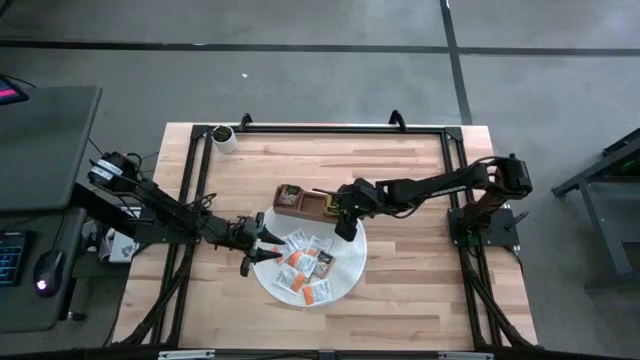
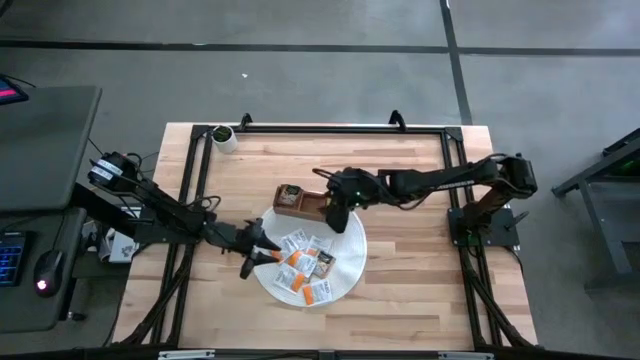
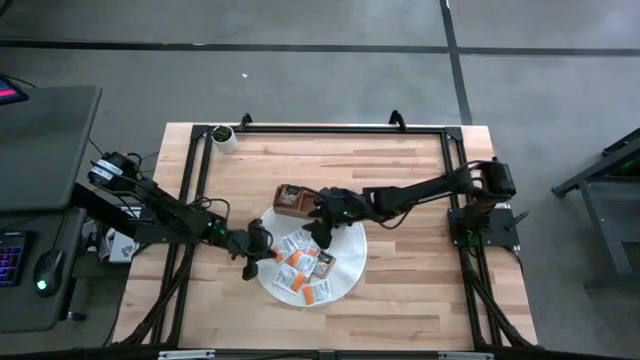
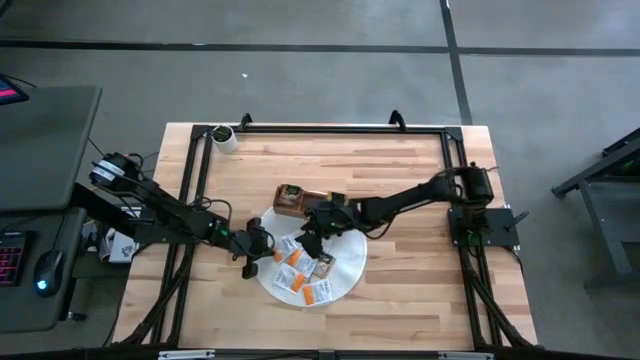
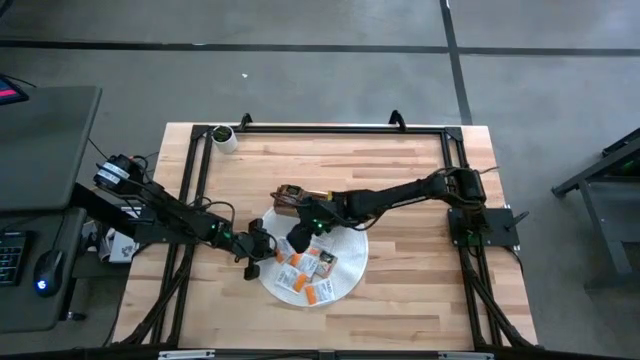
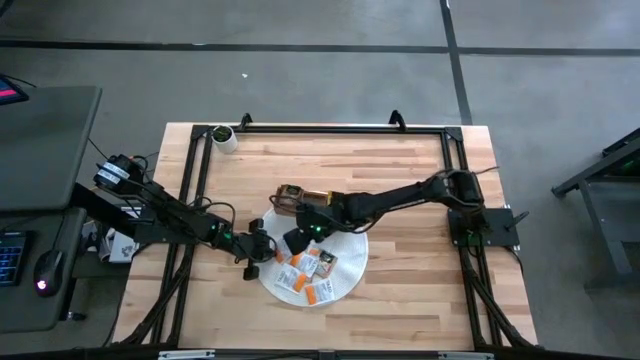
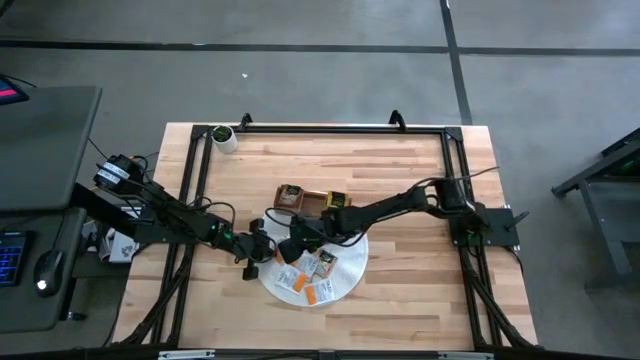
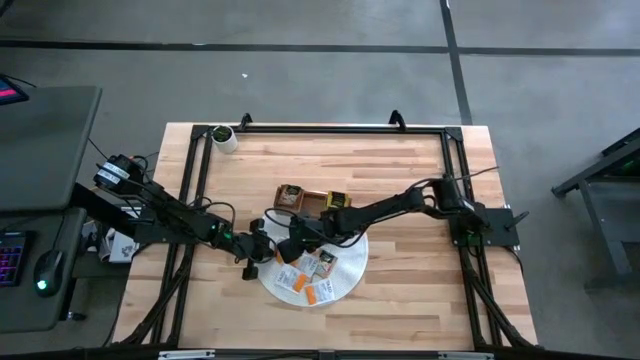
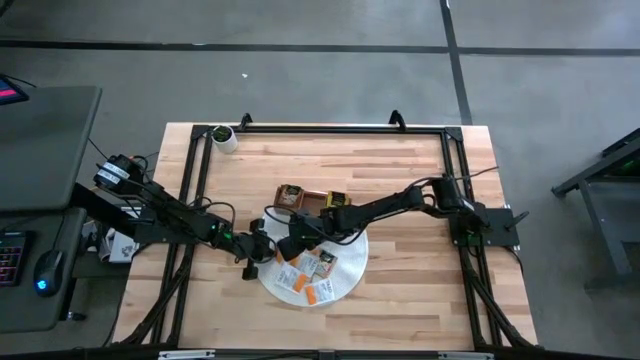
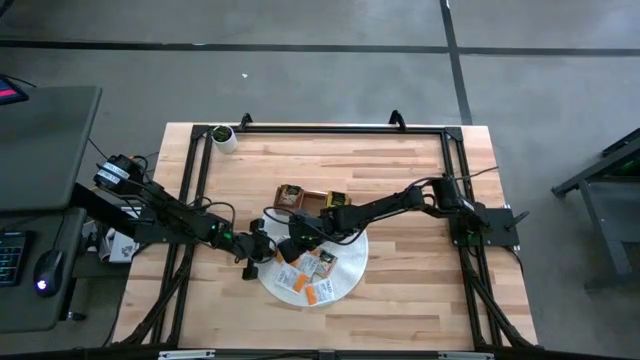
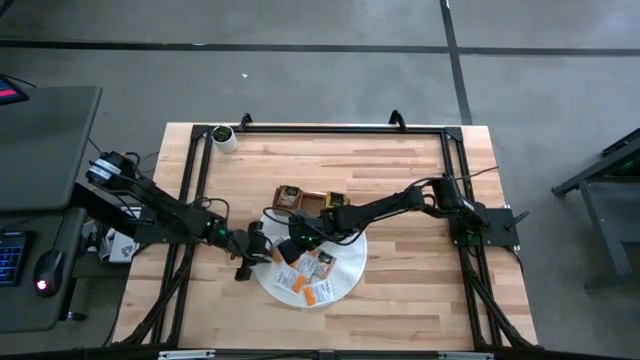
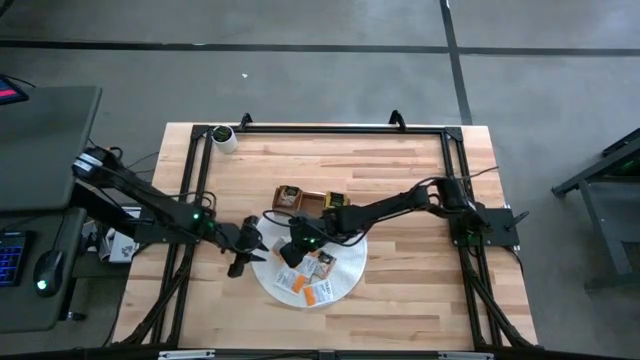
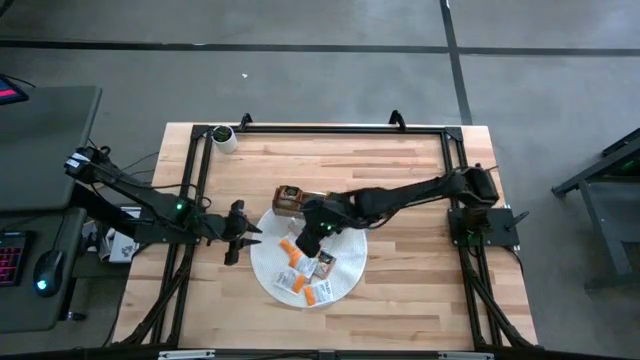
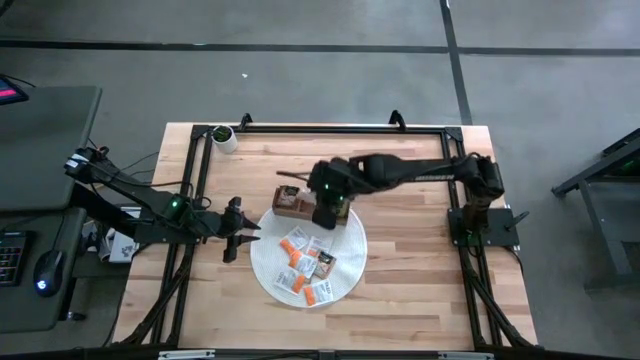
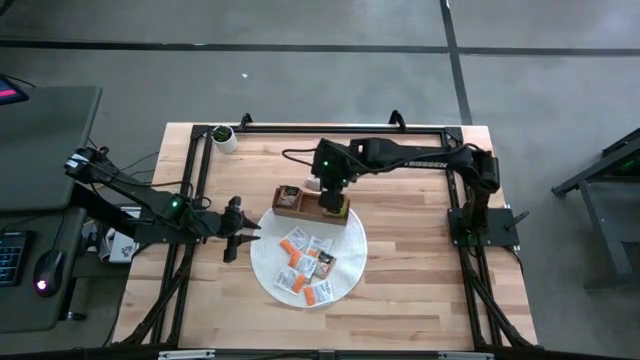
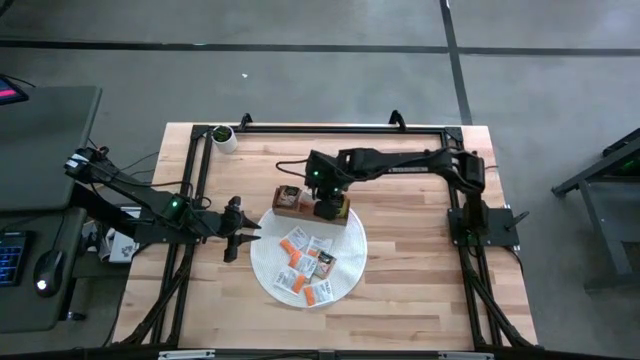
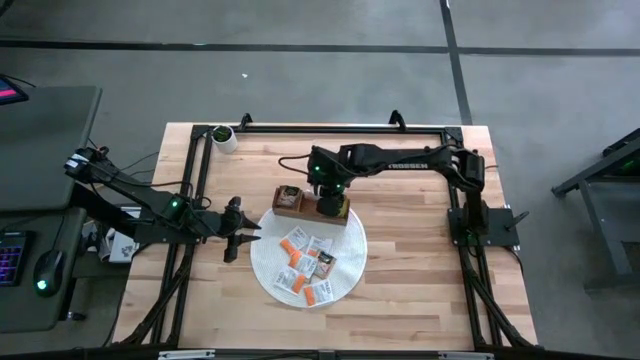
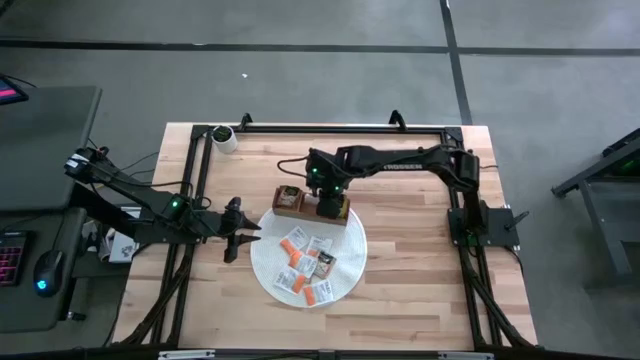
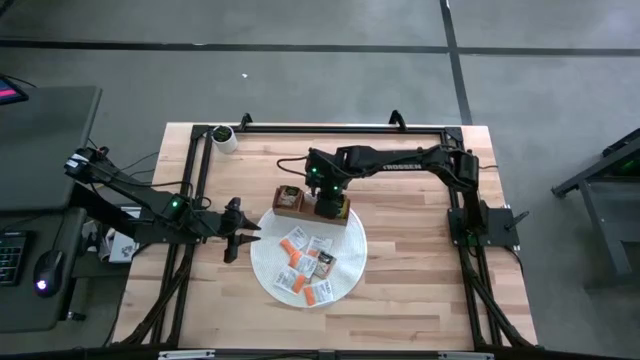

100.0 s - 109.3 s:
Task: Pick & Place Tea
Put the orange tea bag into the middle section of the wooden organizer

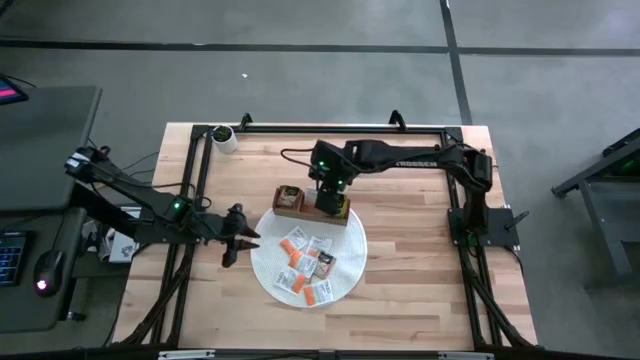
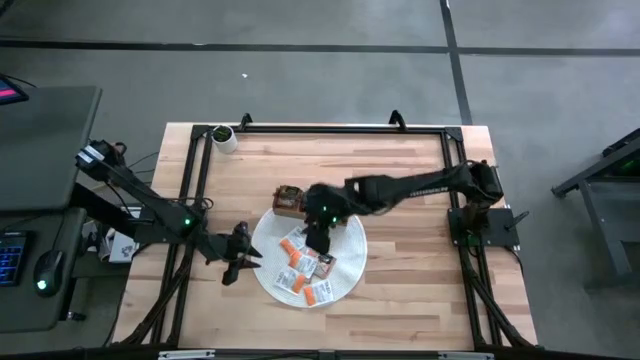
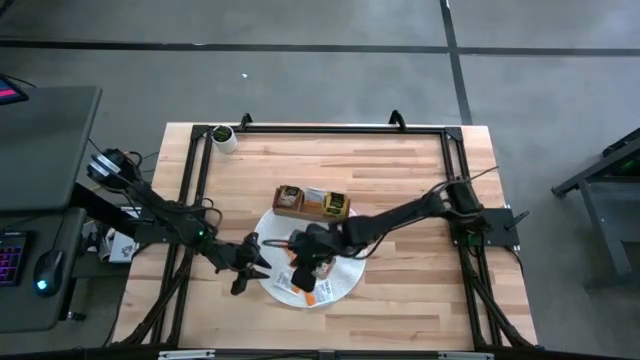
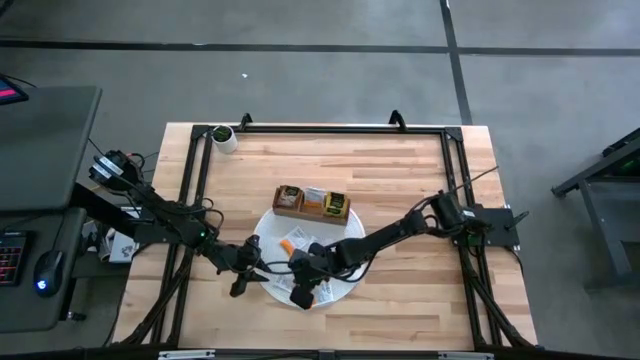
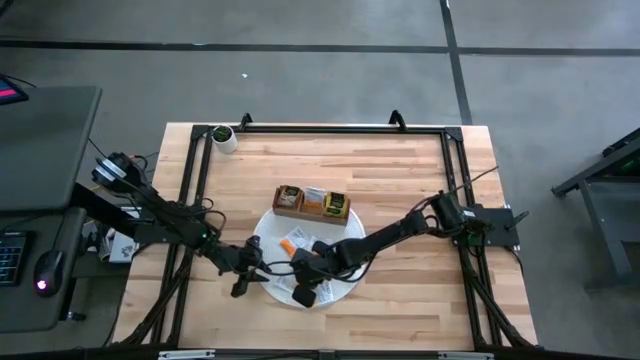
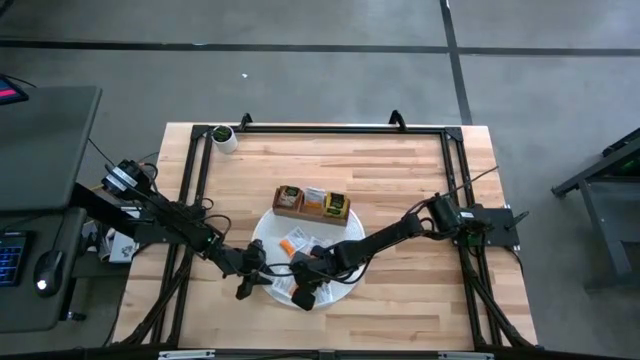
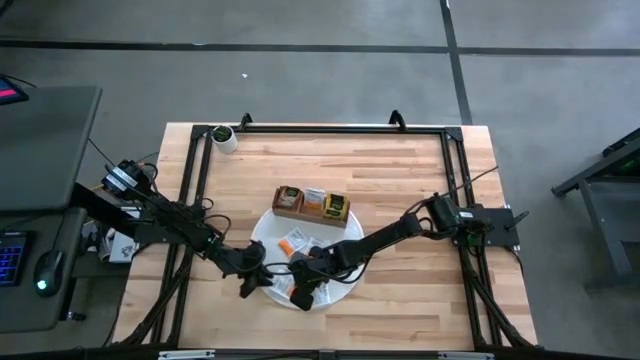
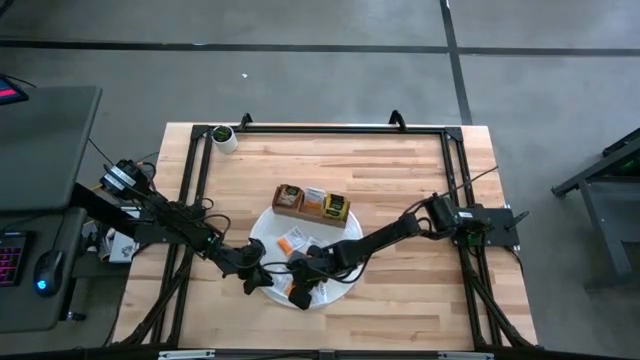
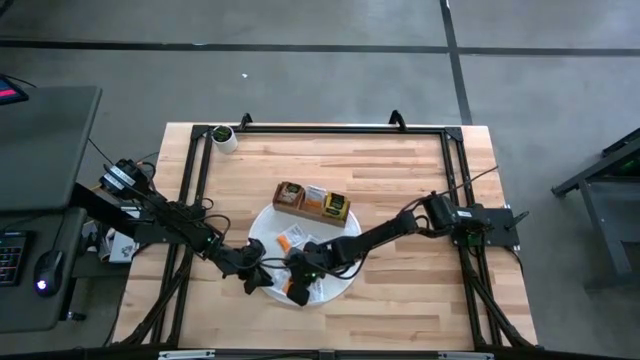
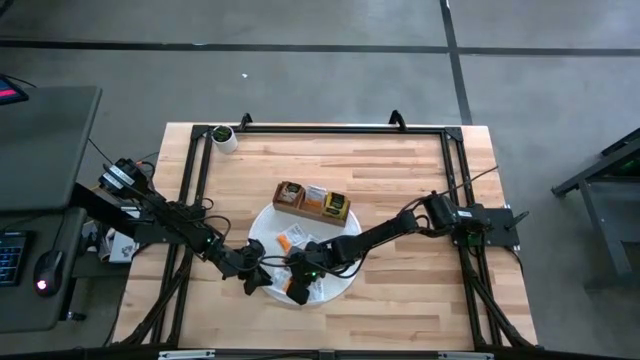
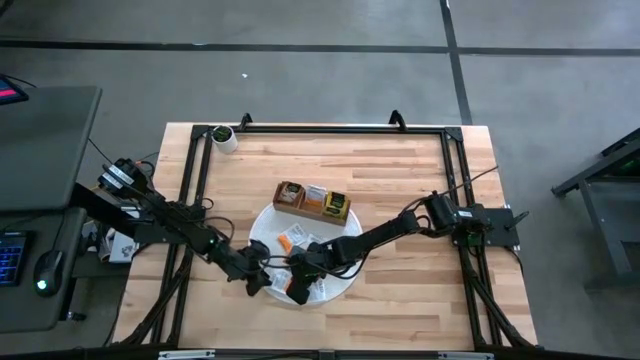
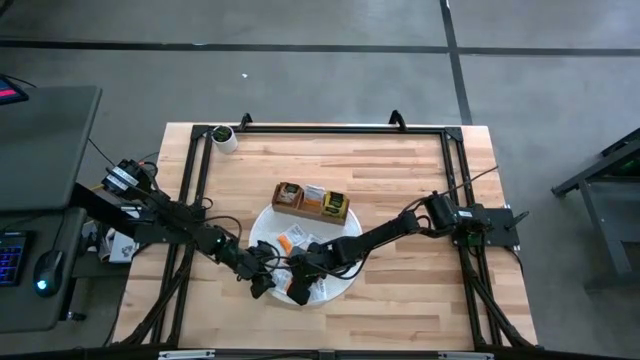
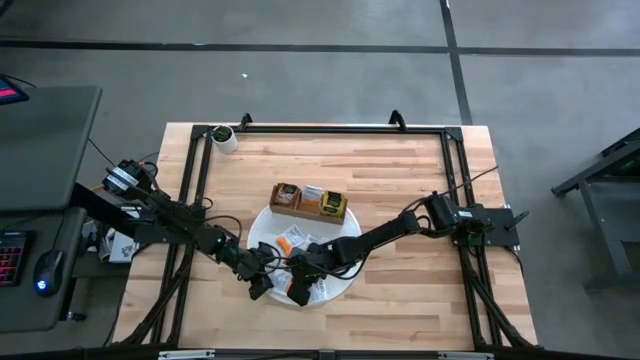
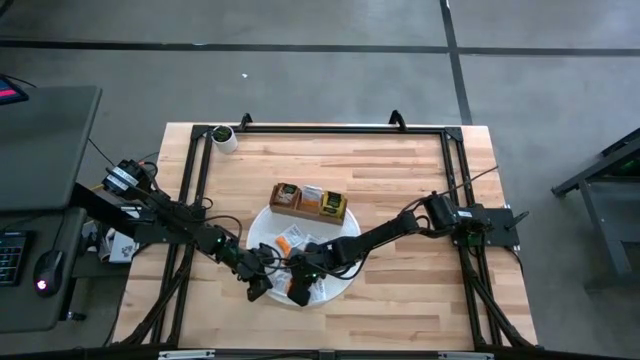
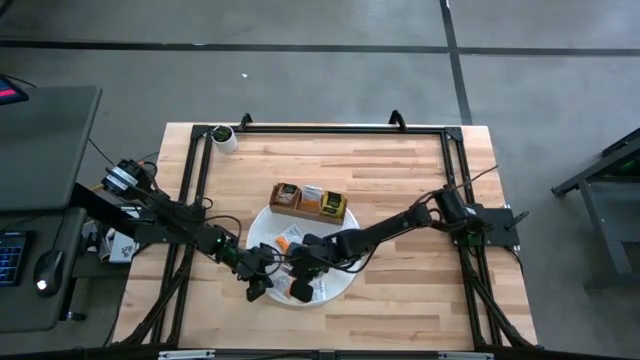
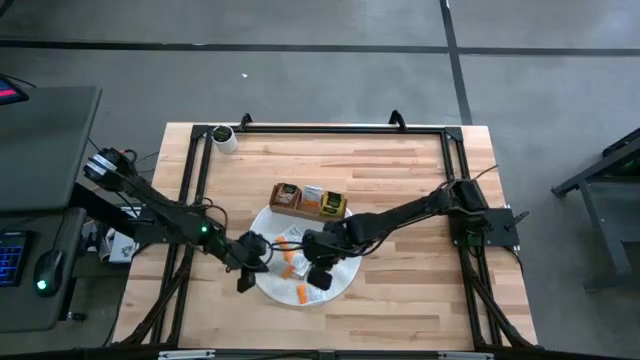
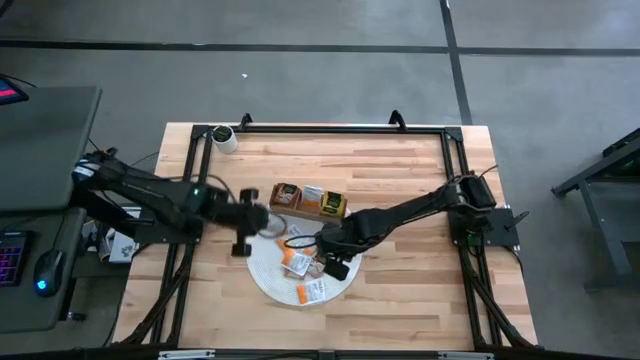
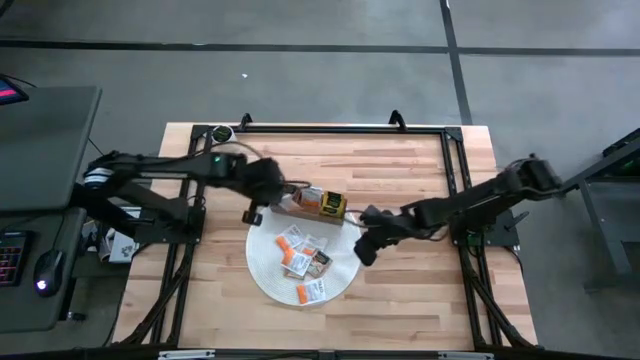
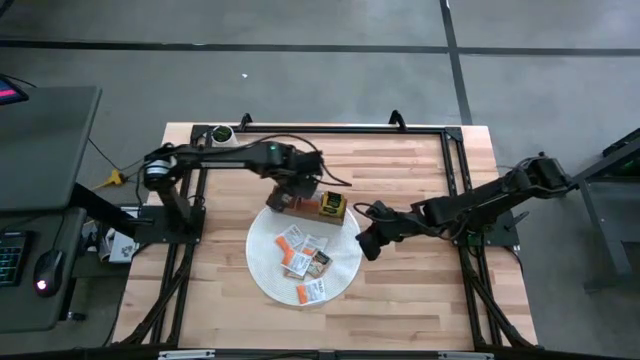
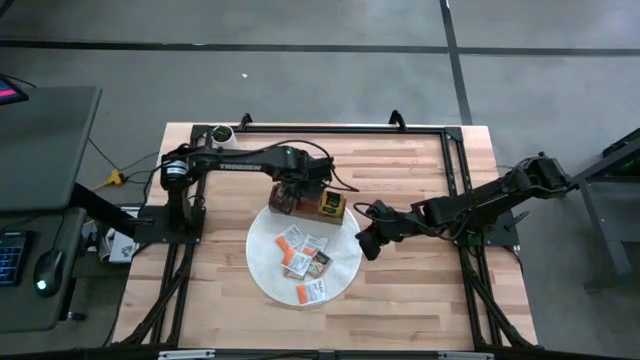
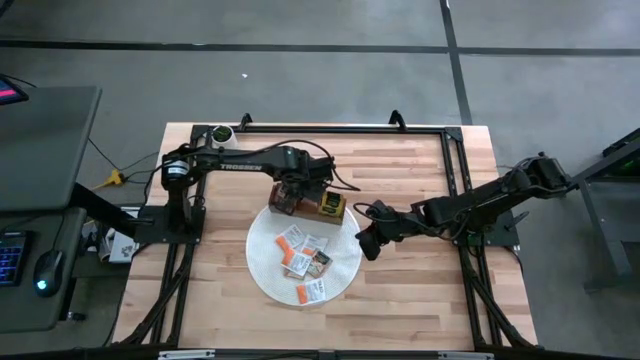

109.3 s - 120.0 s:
Put the orange tea bag into the middle section of the wooden organizer
